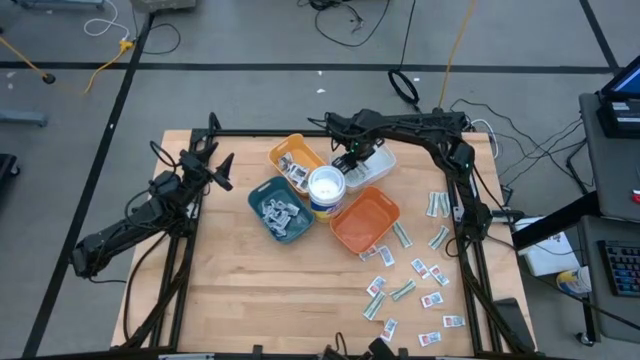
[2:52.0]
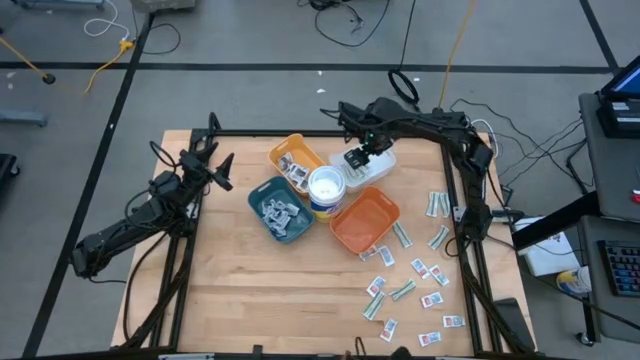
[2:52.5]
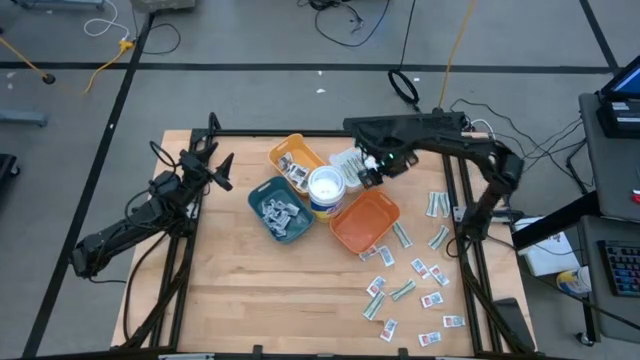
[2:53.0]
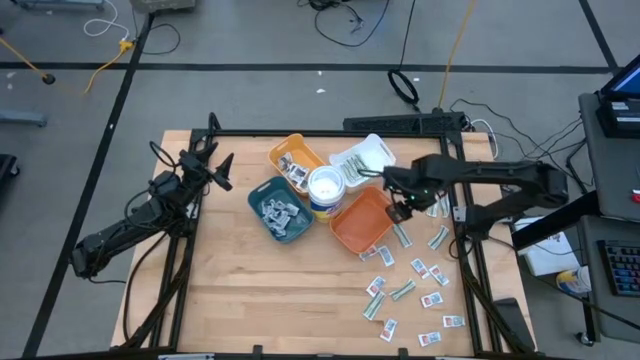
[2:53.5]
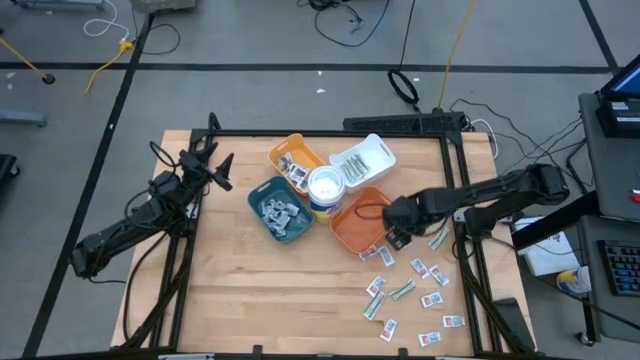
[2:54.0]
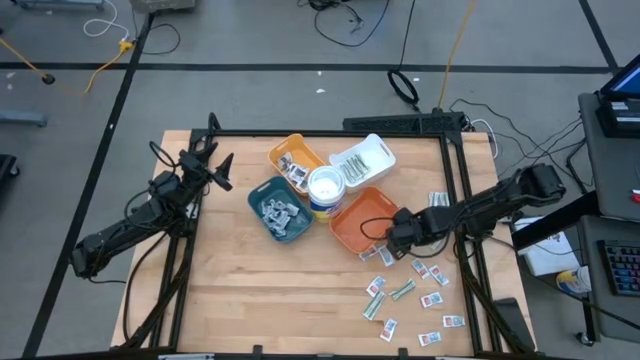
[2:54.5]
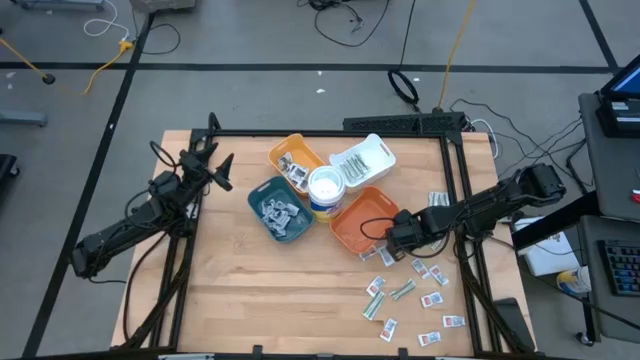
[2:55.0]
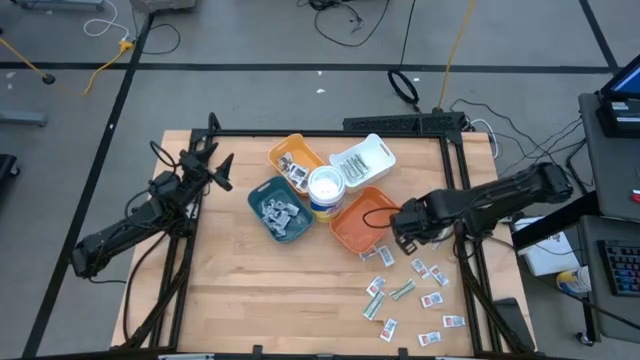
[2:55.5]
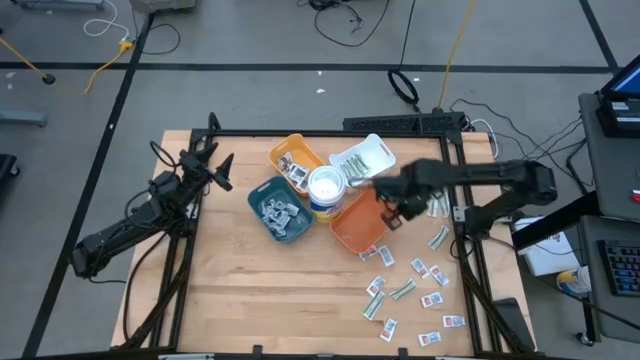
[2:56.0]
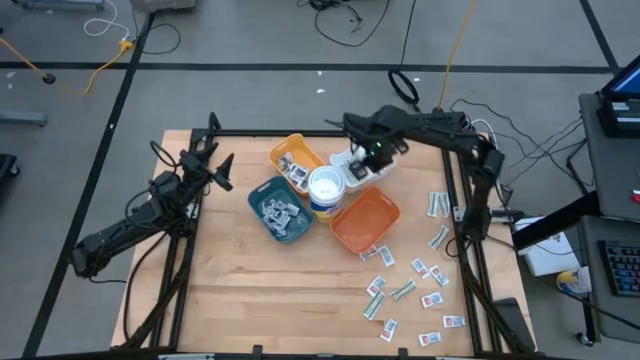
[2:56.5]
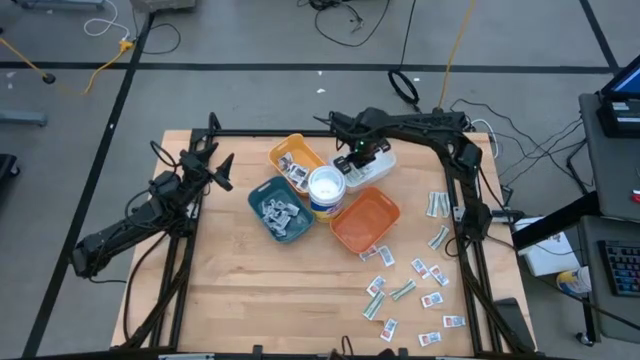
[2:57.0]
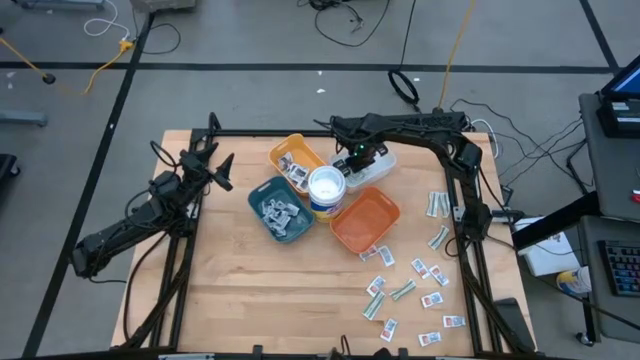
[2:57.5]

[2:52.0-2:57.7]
Task: Pick & Place First Aid Supplies
Put the green bandage into the white bin

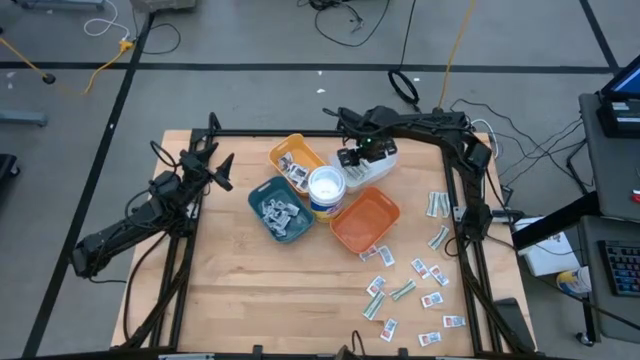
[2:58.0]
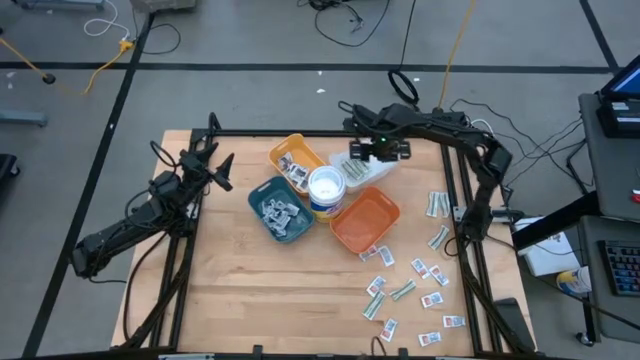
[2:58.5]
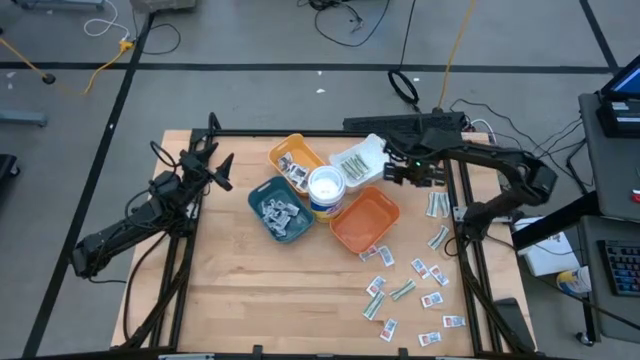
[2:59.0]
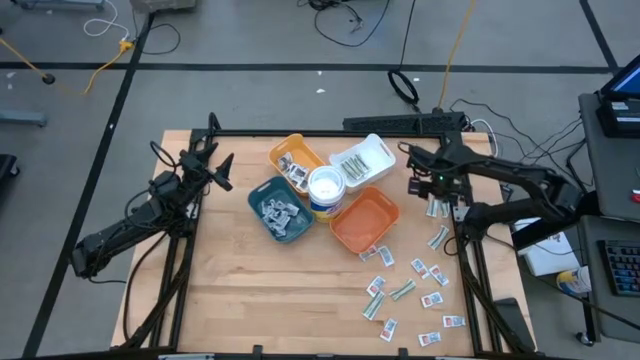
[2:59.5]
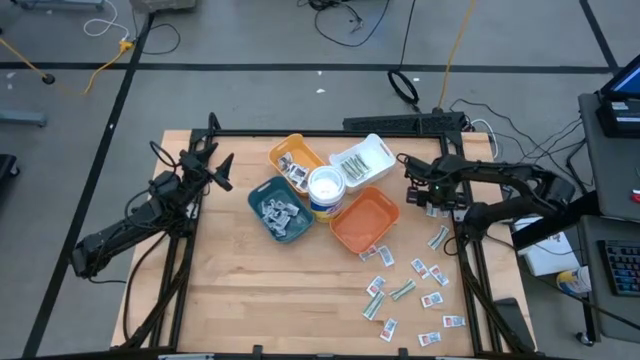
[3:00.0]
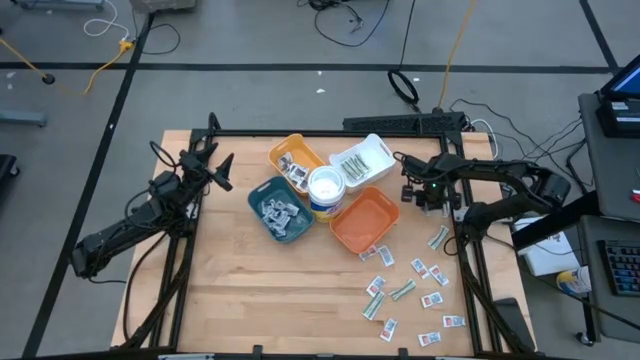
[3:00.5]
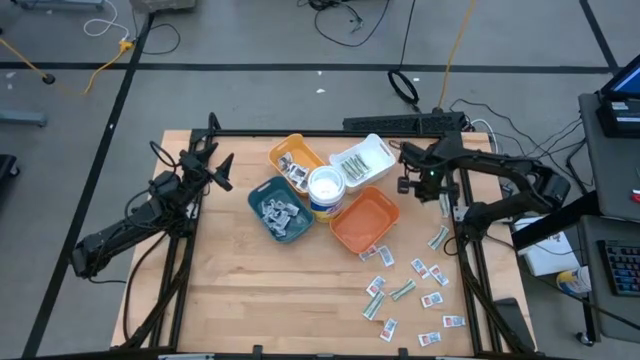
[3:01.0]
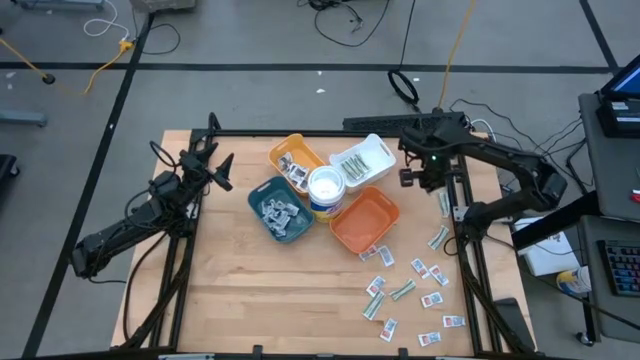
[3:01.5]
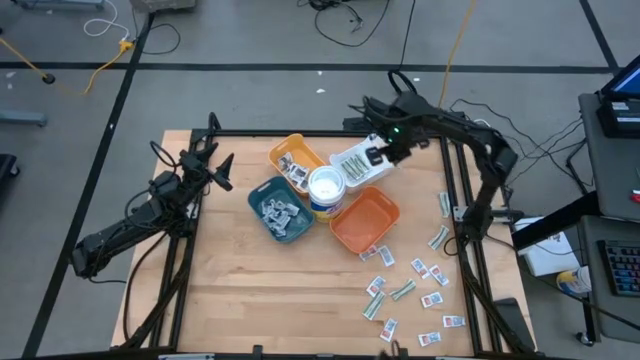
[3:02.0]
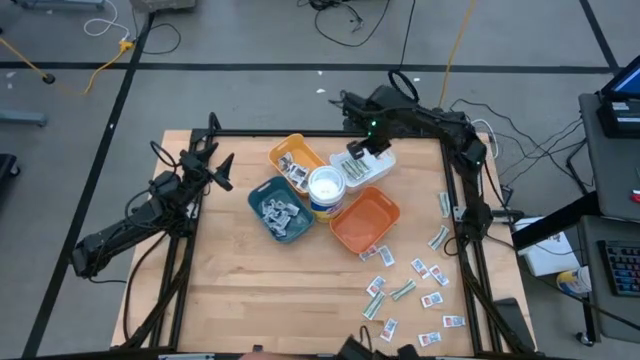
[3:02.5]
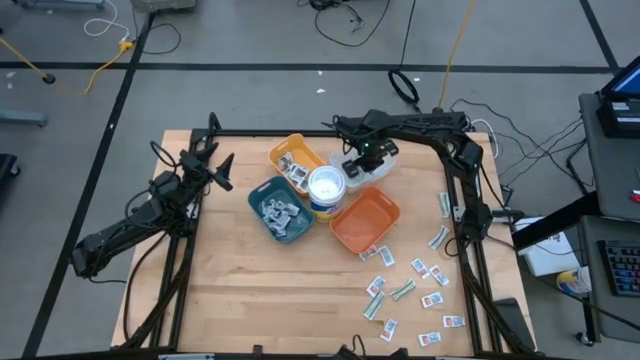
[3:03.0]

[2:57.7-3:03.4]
Put the green bandage into the white bin

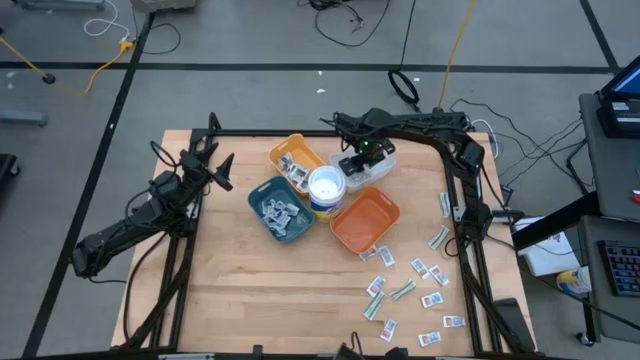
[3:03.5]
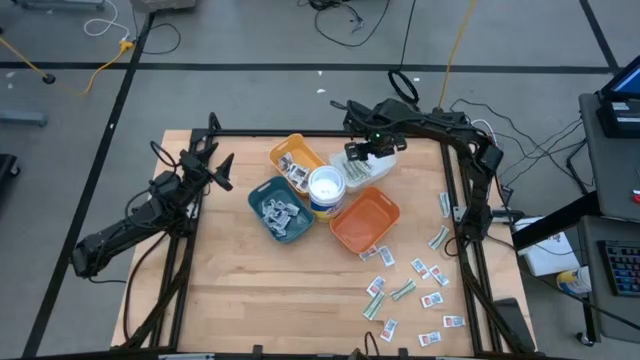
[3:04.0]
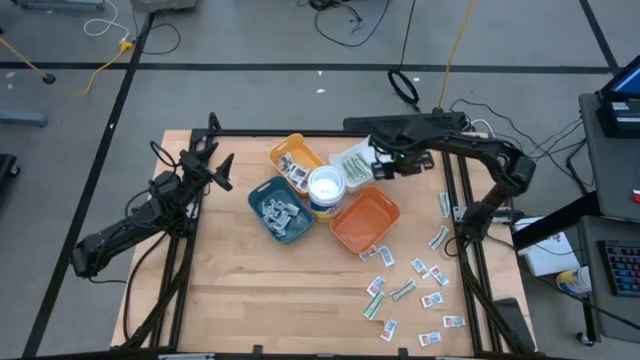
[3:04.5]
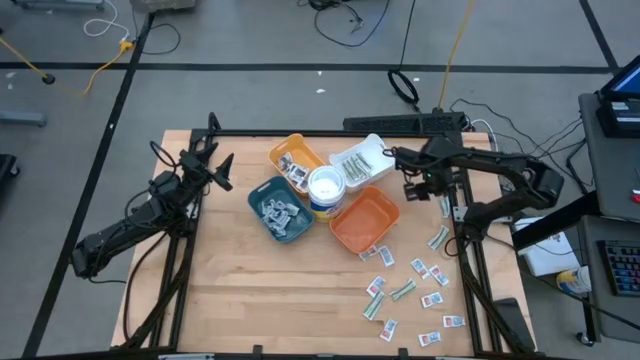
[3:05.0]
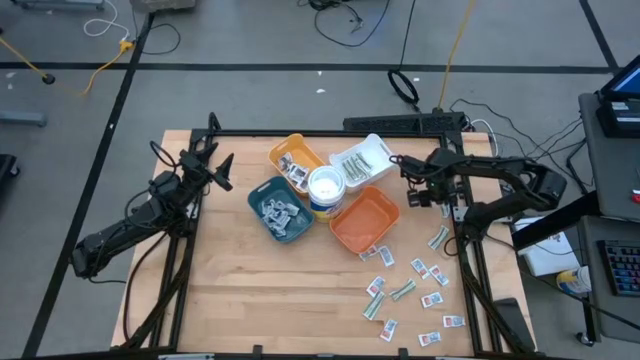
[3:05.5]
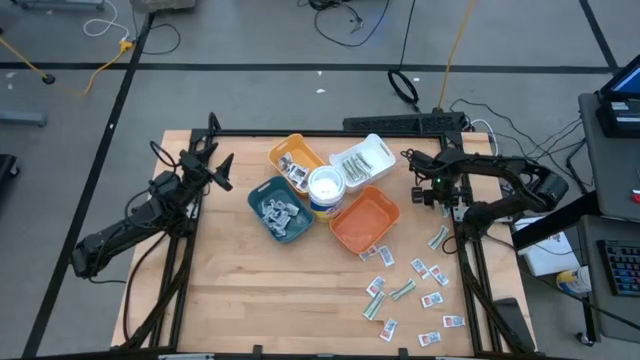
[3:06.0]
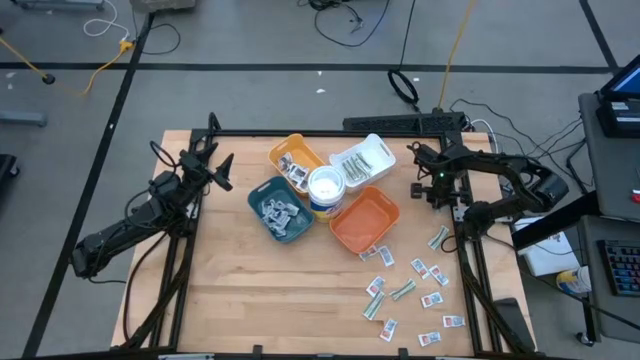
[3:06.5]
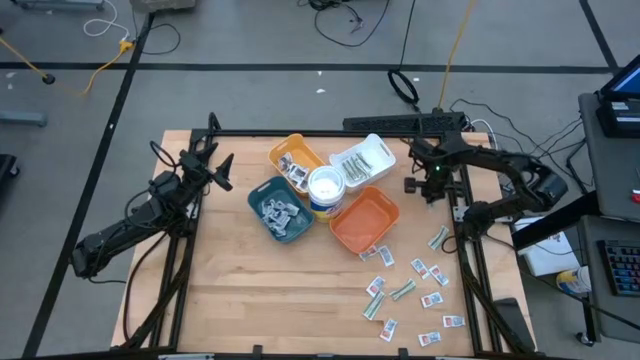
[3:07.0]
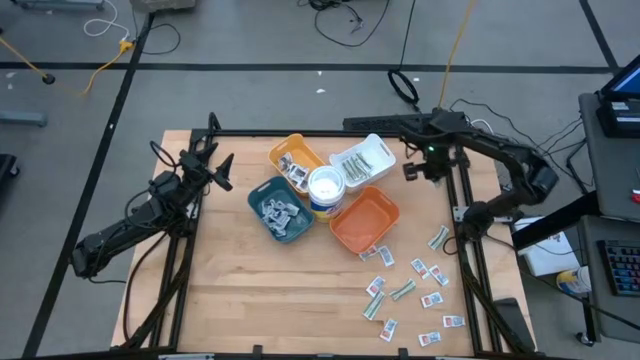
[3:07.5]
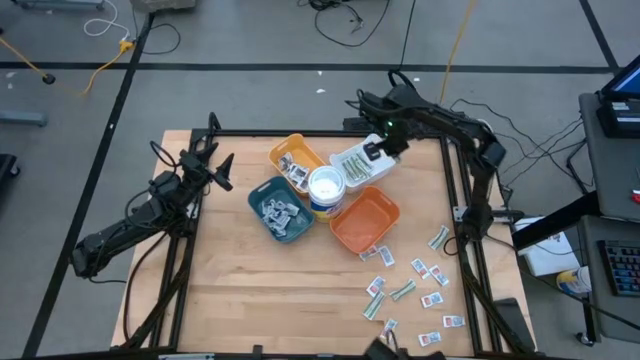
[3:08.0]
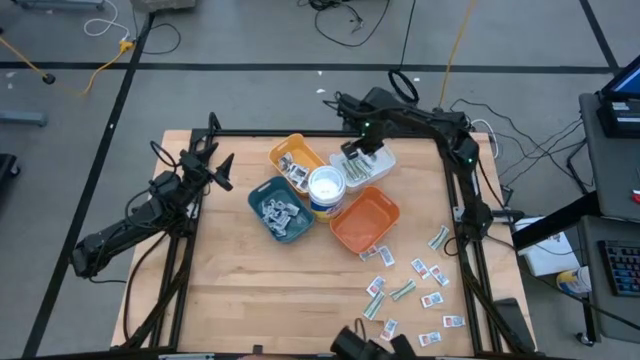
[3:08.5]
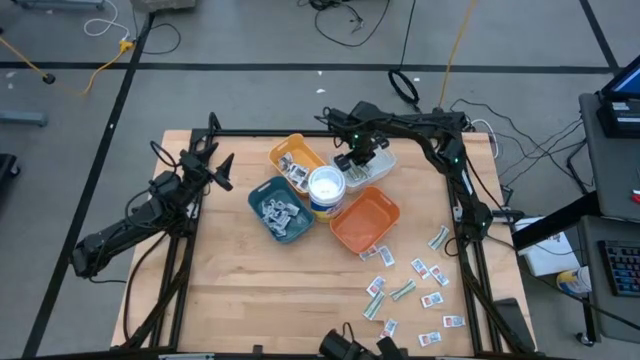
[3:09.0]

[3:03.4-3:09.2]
Put the green bandage into the white bin

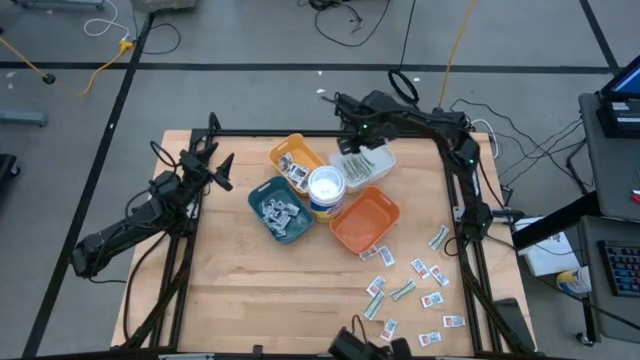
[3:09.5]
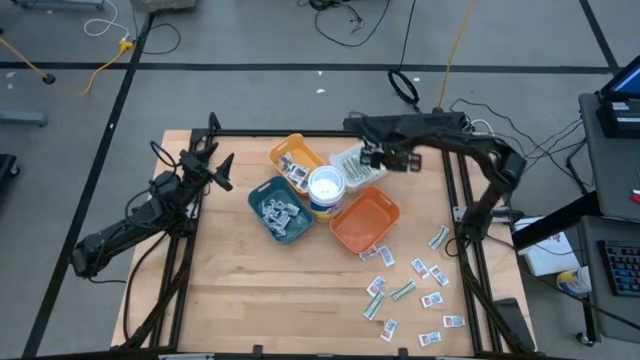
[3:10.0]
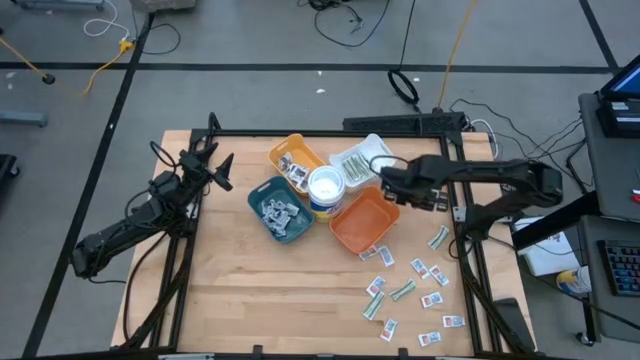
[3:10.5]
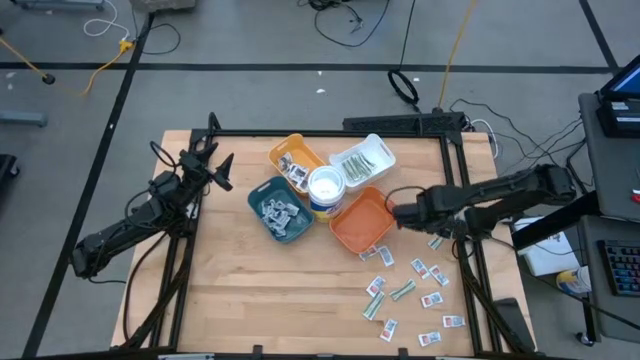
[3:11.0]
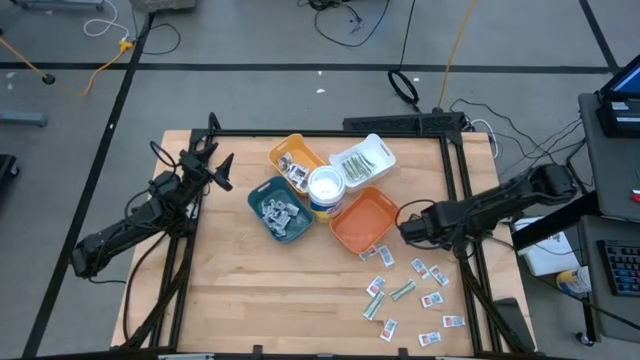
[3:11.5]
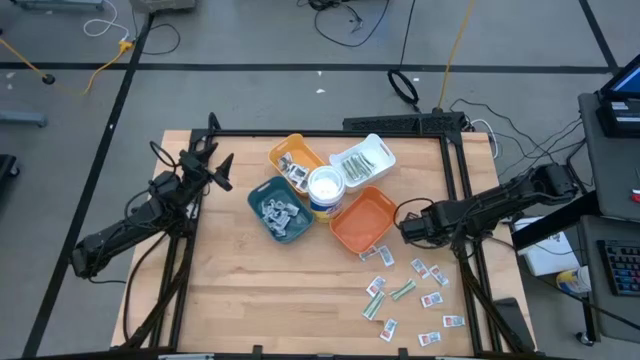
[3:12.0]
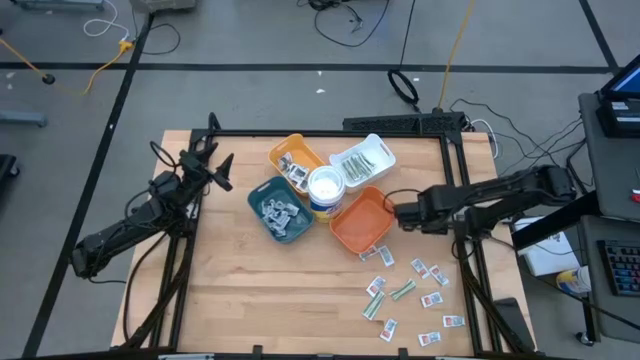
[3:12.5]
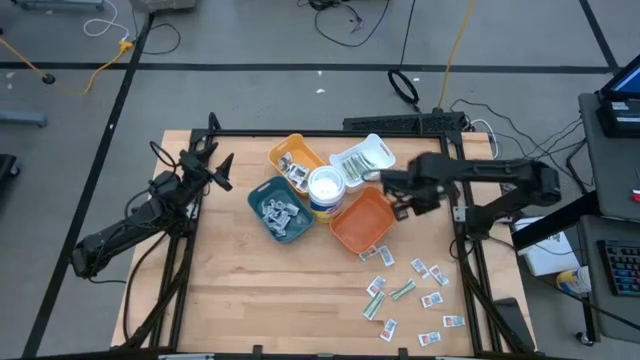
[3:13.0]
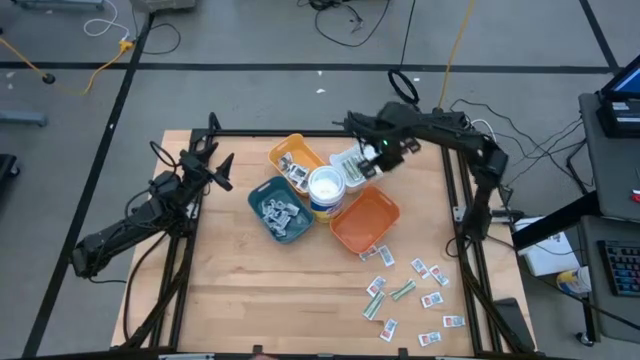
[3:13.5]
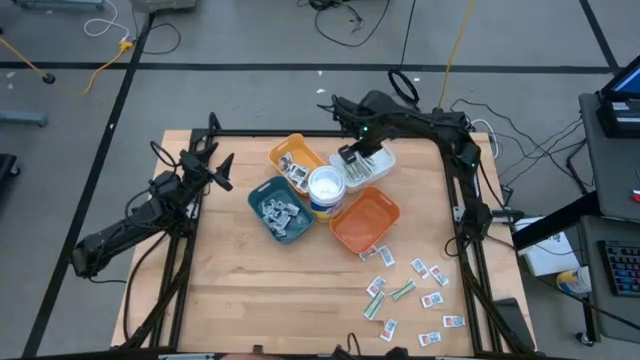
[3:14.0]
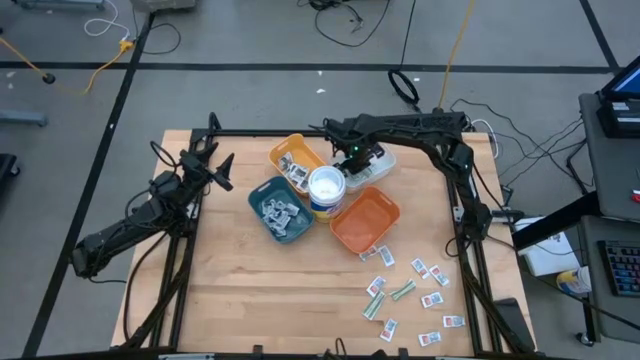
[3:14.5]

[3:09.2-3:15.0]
Put the green bandage into the white bin
